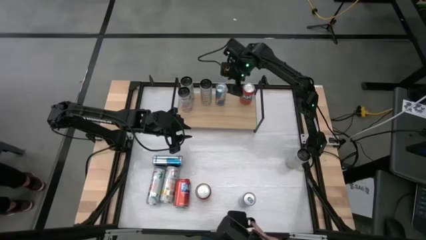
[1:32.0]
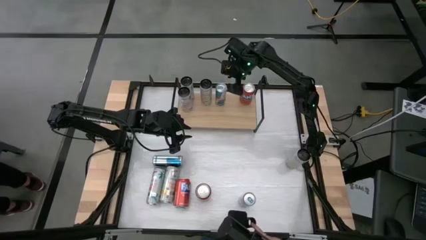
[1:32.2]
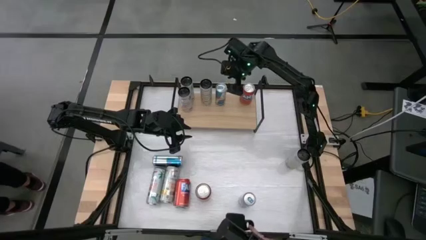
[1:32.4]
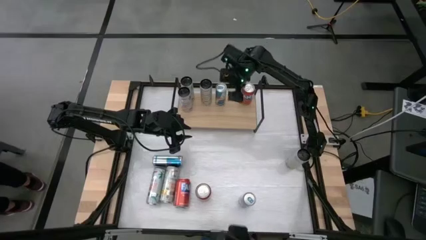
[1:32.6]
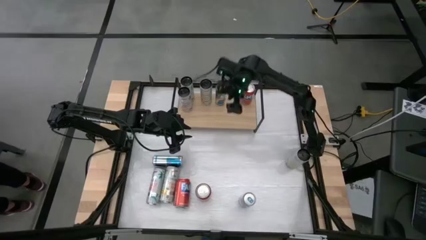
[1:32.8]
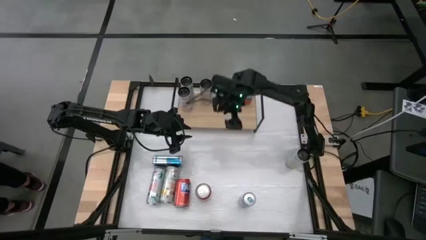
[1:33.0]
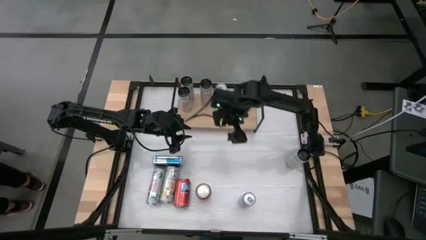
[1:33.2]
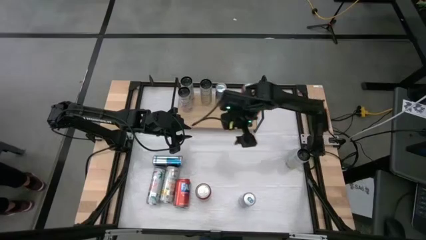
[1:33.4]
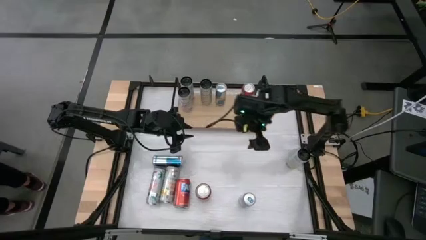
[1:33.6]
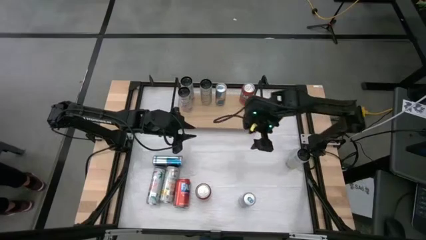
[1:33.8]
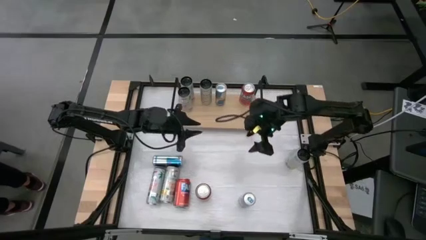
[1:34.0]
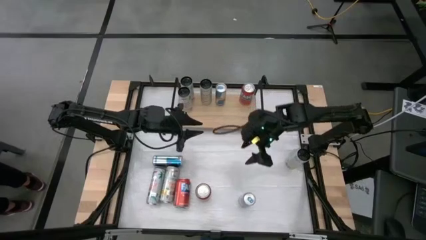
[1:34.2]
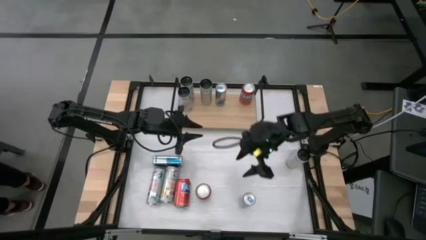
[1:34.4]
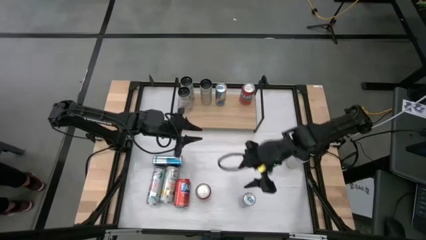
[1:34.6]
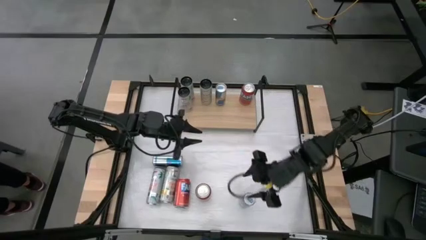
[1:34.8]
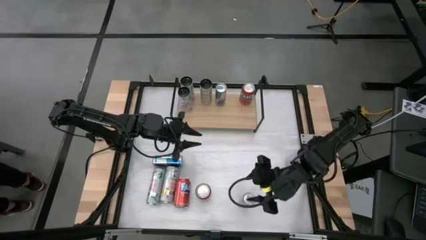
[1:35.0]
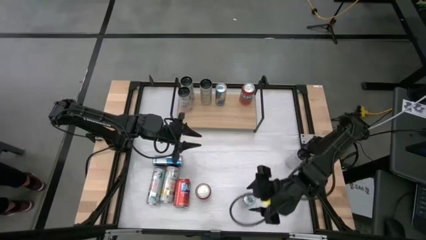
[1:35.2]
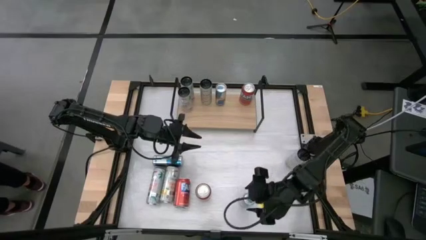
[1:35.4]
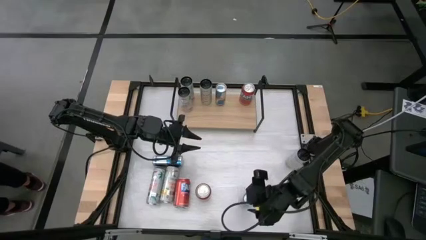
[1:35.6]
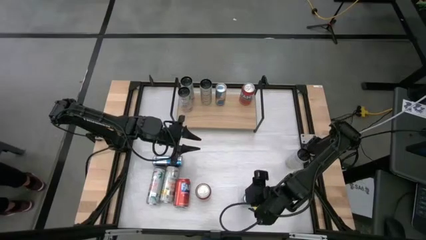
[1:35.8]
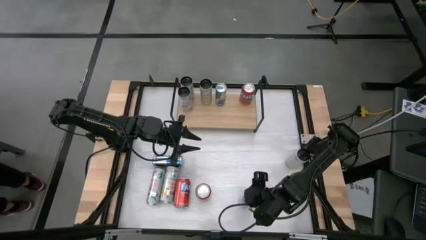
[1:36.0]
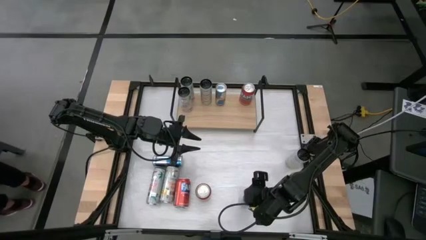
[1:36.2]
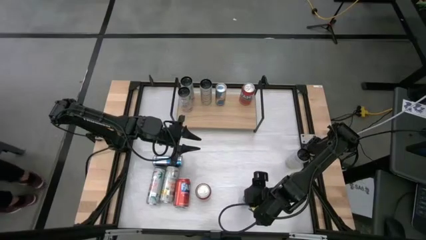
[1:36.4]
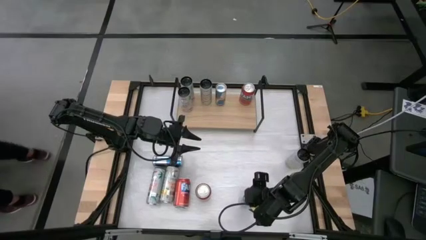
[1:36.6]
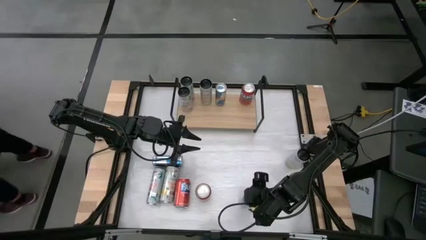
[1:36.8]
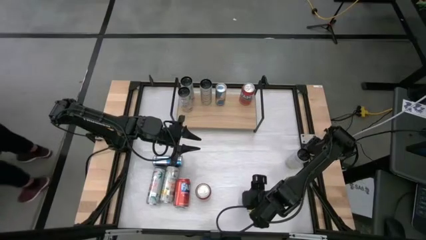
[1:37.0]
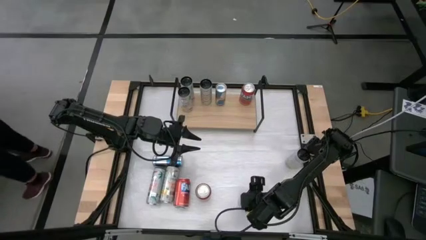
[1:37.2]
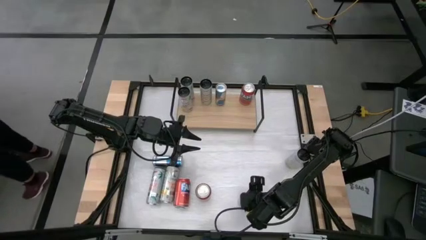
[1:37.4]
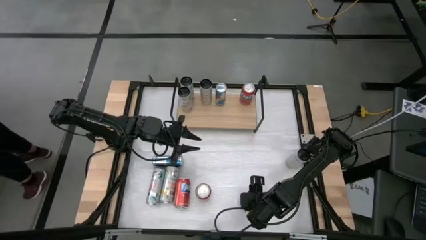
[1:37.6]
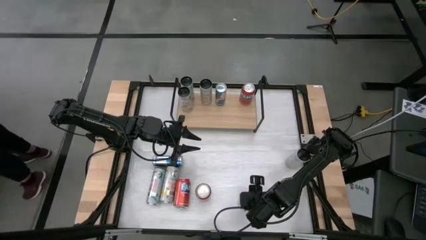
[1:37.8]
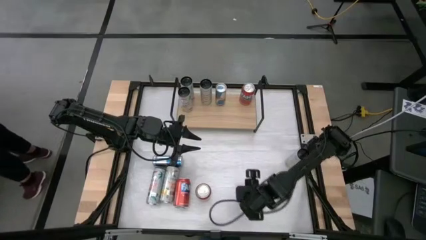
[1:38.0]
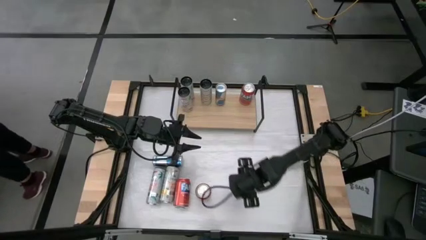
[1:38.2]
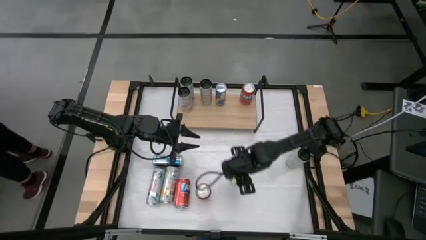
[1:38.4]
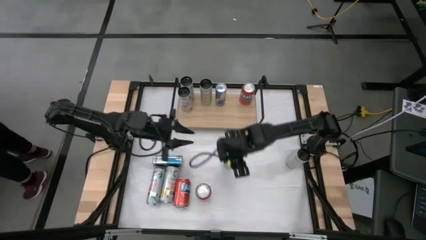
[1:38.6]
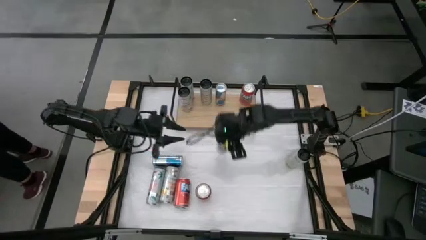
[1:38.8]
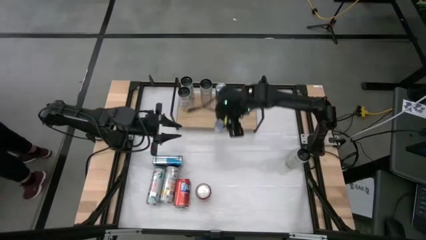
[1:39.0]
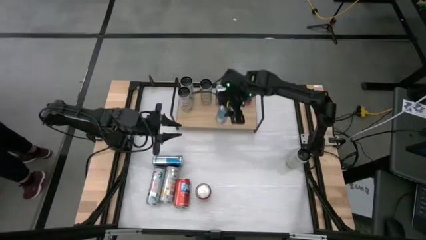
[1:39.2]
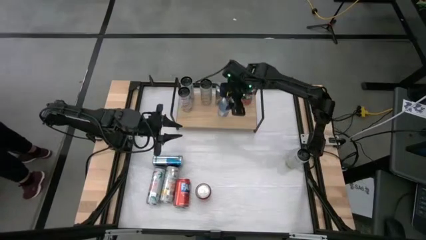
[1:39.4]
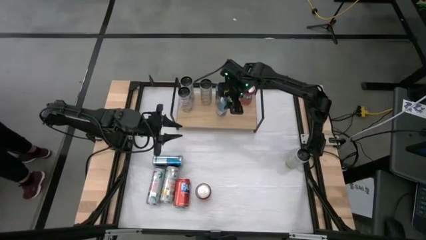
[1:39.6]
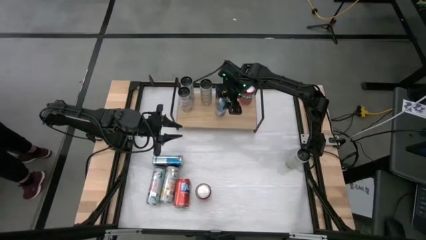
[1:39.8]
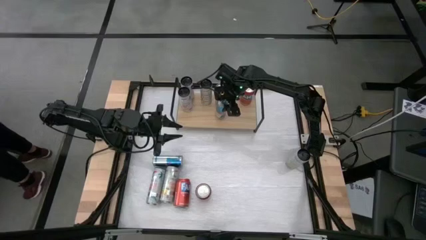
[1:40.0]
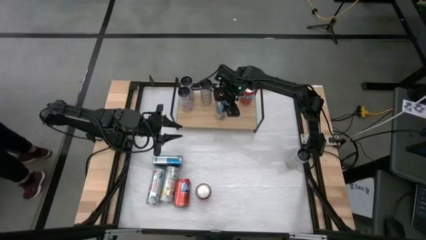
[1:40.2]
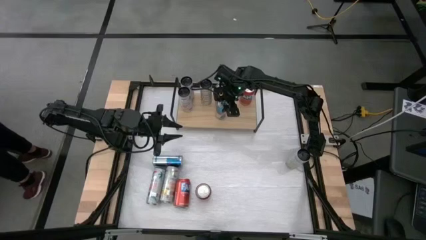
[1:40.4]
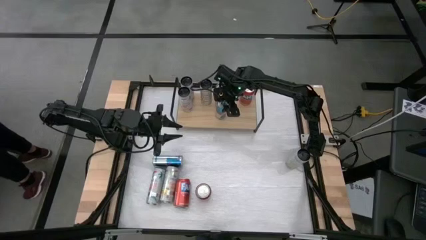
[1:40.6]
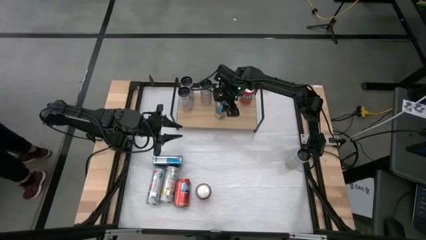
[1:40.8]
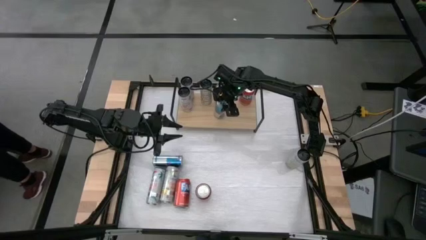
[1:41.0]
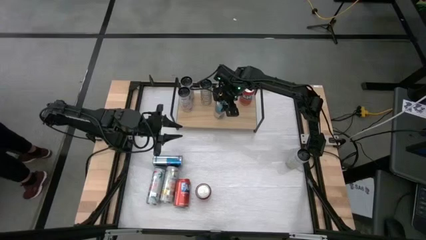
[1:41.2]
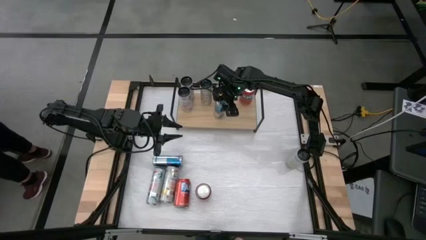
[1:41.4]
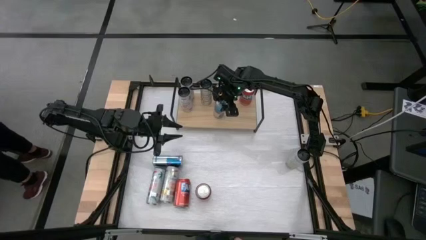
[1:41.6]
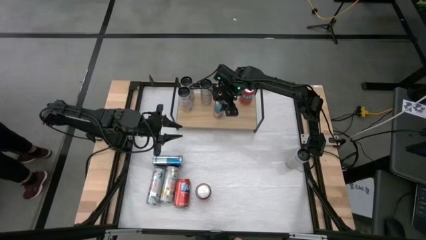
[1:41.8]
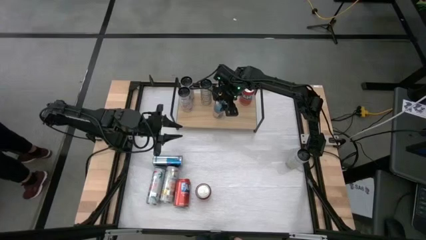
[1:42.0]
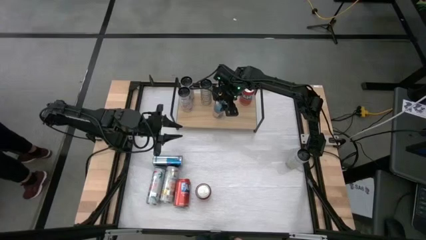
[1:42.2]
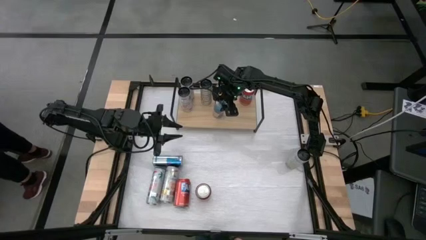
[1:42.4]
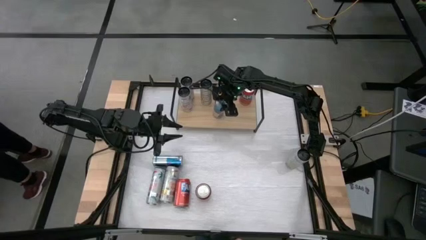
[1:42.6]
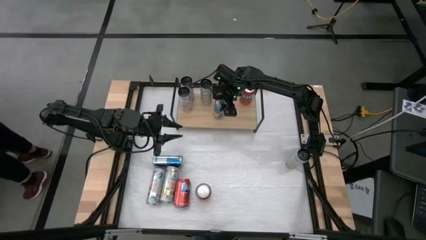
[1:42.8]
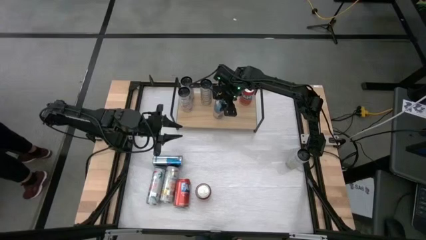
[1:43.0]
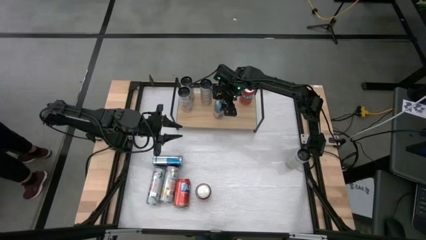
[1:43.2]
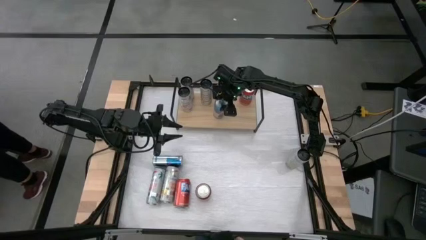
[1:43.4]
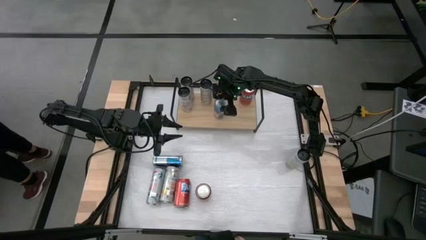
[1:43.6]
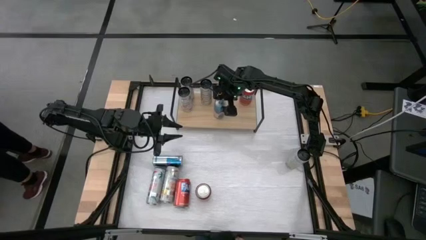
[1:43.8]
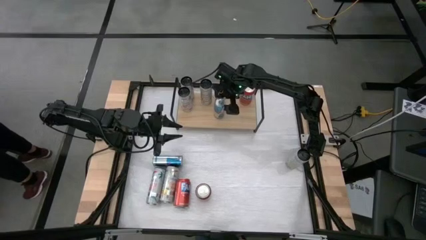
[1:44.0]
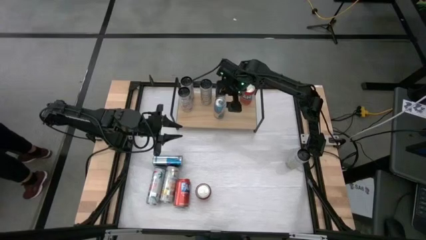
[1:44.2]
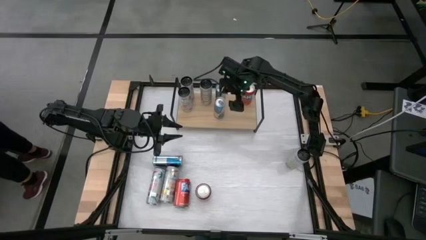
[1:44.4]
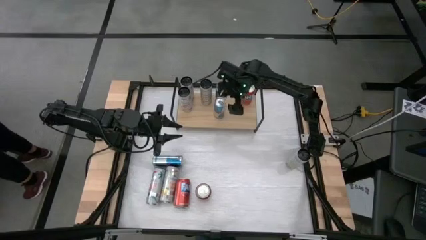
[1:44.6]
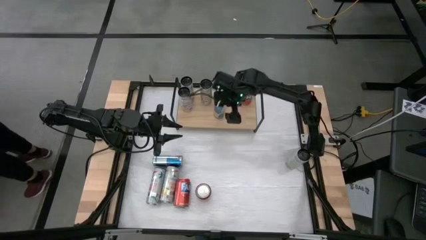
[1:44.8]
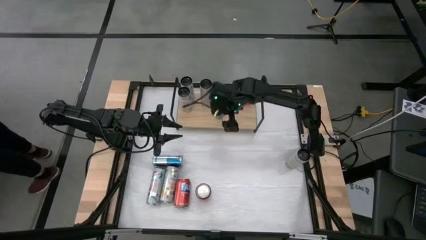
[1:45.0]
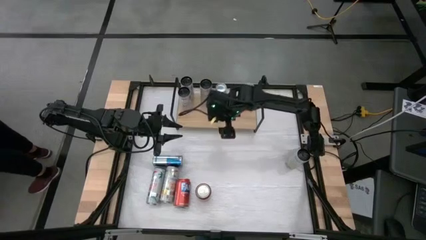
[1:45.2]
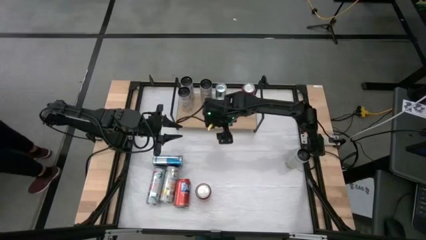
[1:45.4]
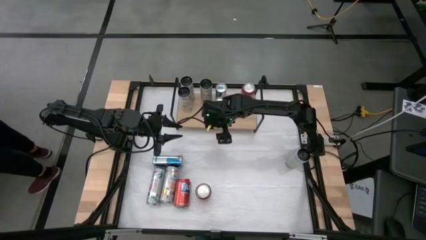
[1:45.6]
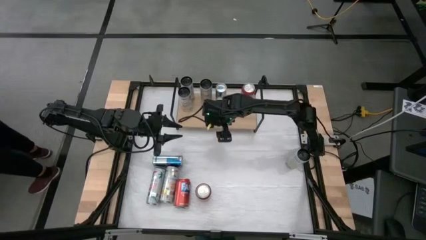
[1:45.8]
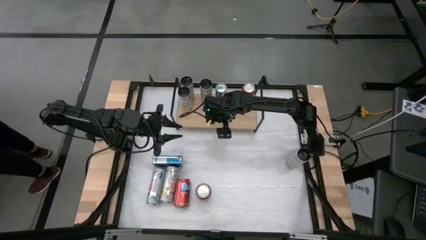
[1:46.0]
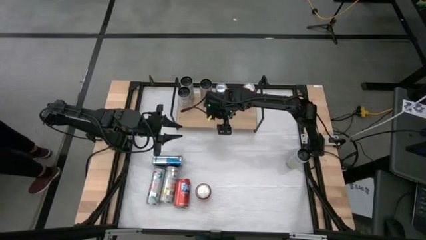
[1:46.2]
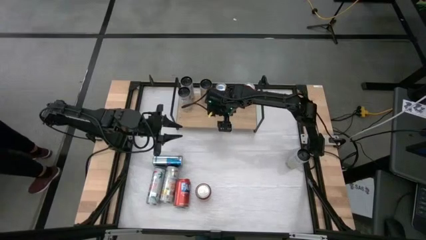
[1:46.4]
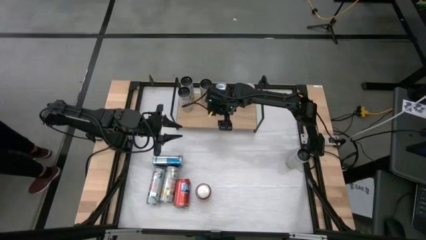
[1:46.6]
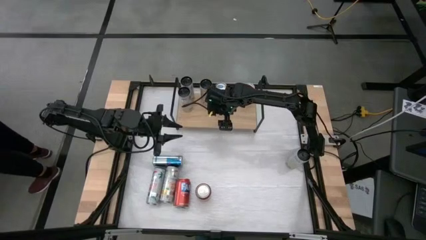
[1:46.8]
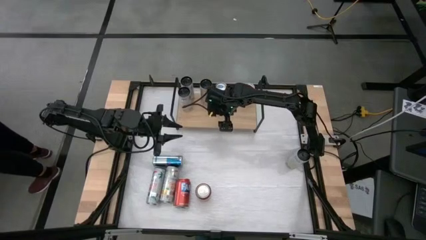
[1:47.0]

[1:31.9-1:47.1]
Task: Place canned beverage on shelf
Put the bottom blue soda can on the shelf aligned with the other blue soda can

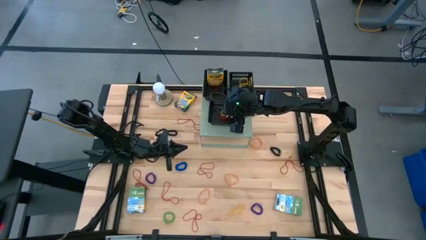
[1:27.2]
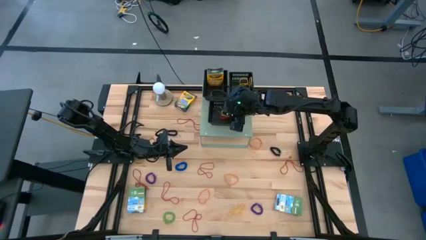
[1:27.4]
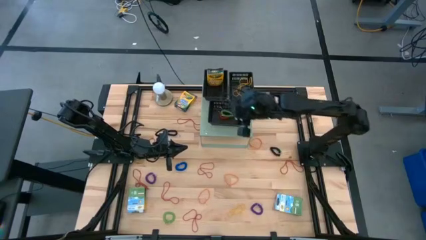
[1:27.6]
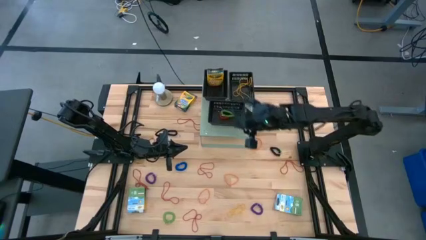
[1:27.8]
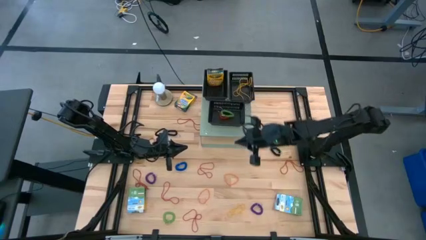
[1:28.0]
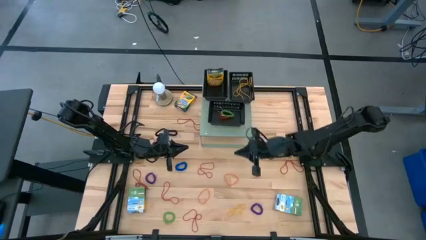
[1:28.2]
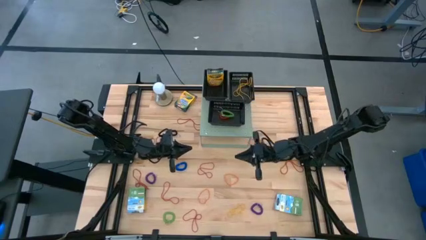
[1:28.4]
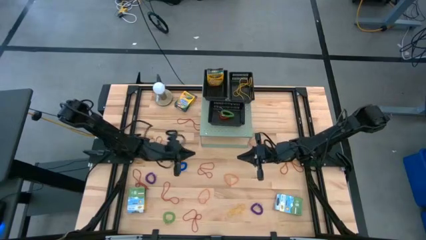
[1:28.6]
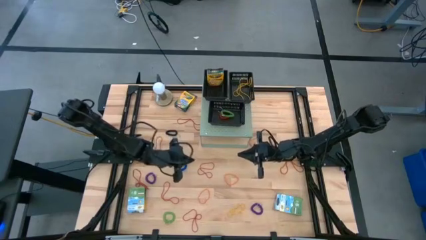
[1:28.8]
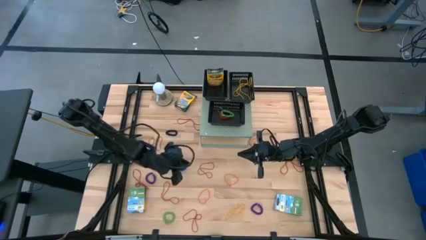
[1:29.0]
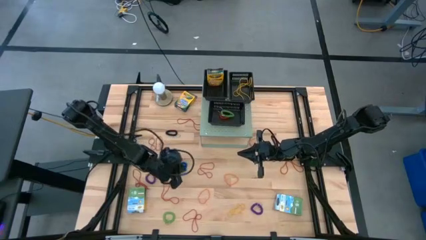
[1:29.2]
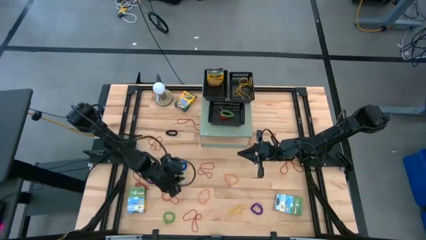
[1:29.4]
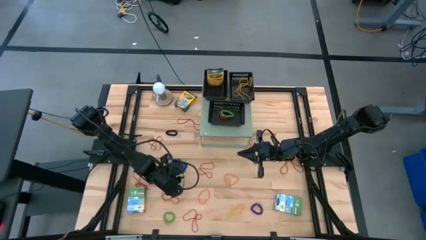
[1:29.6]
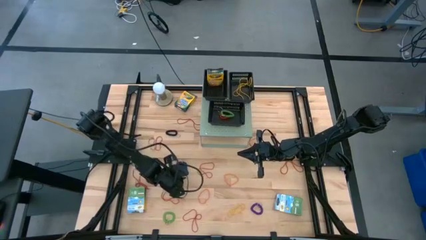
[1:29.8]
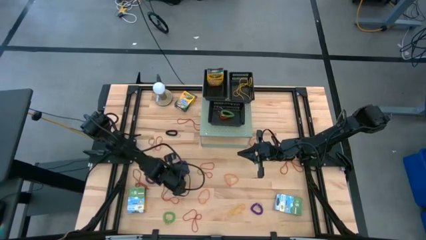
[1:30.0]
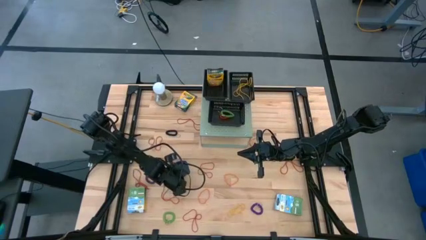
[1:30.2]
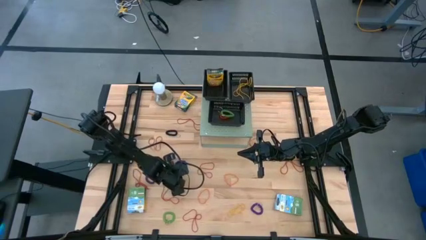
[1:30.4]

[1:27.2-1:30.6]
Task: Pick & Place Office Desk Supplies
Put the blue spring keychain into the bottom black bin on the shelf
